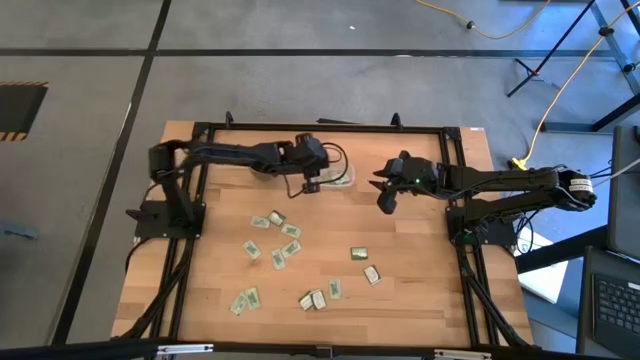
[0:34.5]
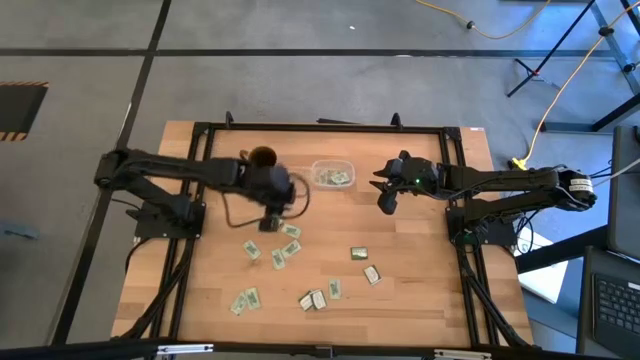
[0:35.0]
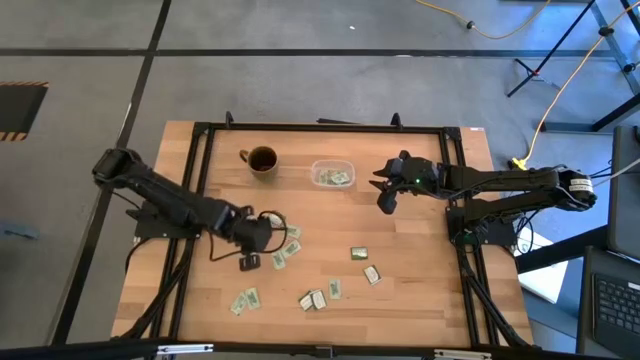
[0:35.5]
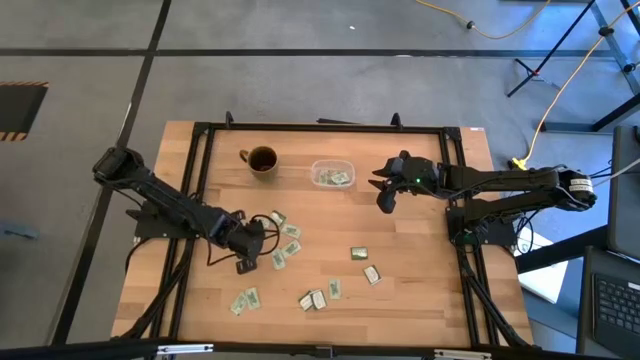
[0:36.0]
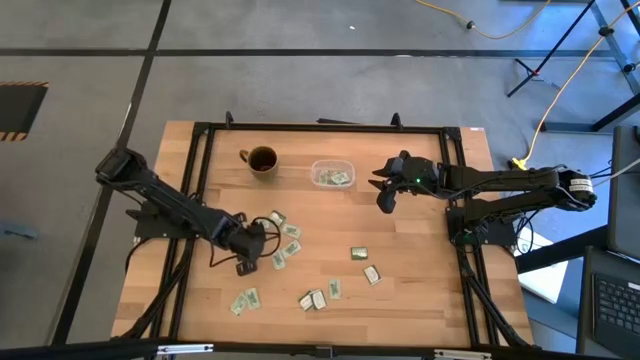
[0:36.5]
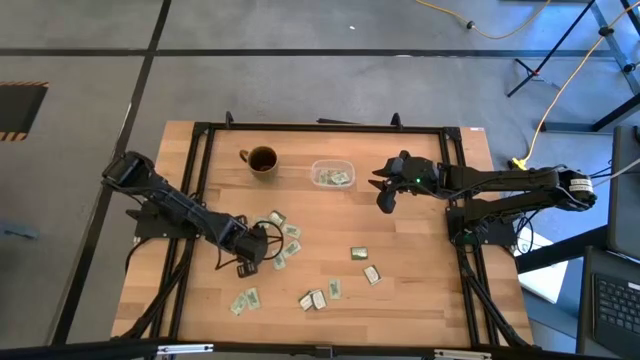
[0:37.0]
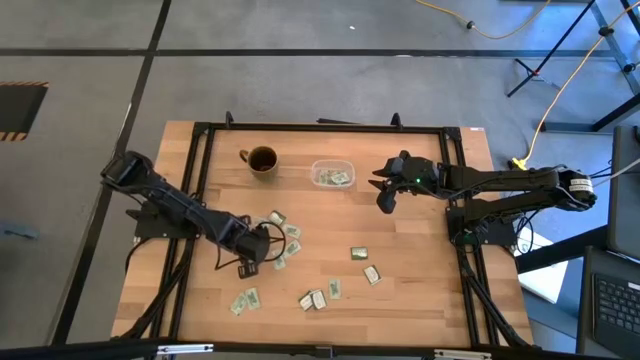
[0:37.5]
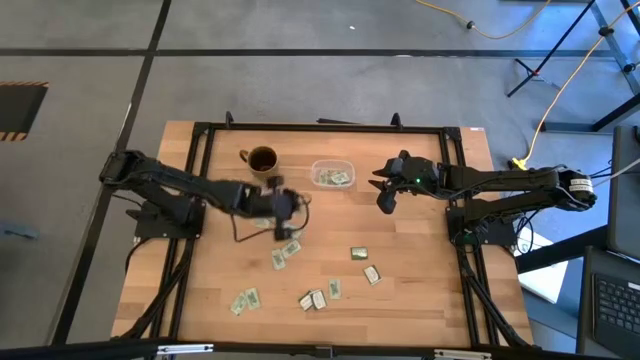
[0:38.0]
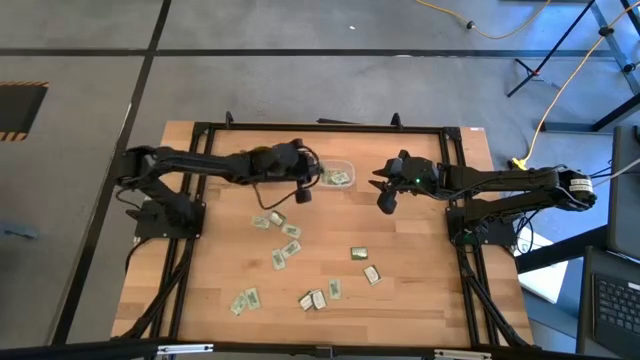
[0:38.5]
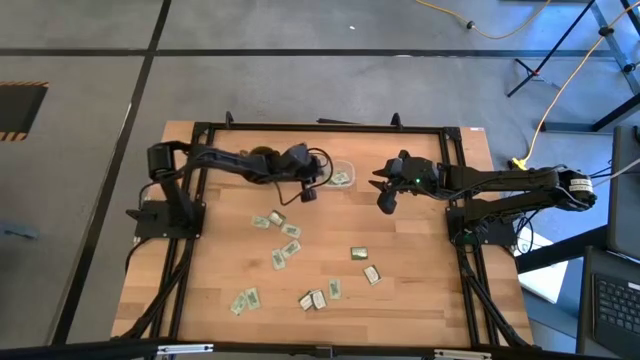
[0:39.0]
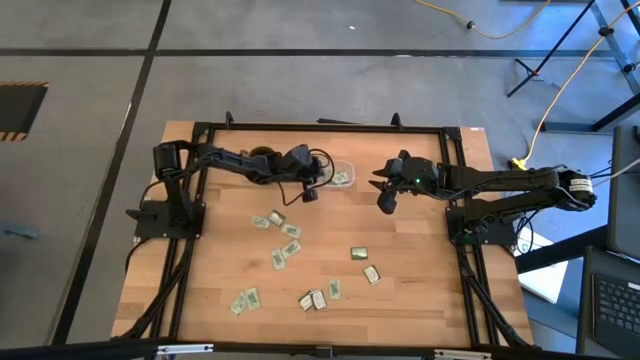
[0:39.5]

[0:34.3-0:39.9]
Task: Pick and place Stevia / Truvia into bins
Put the stevia packet into the transparent container

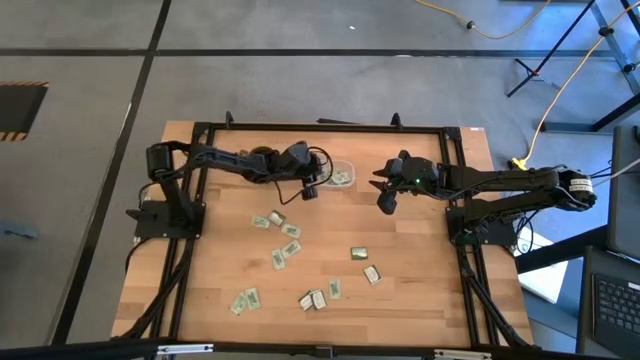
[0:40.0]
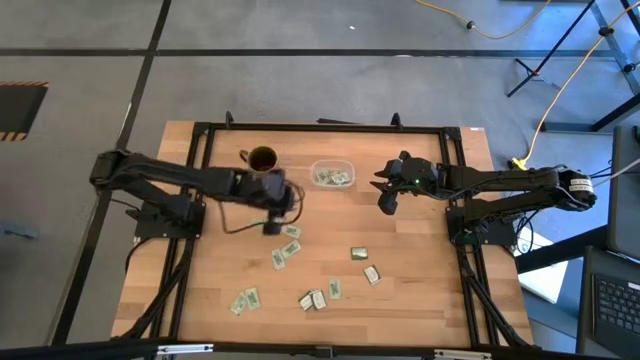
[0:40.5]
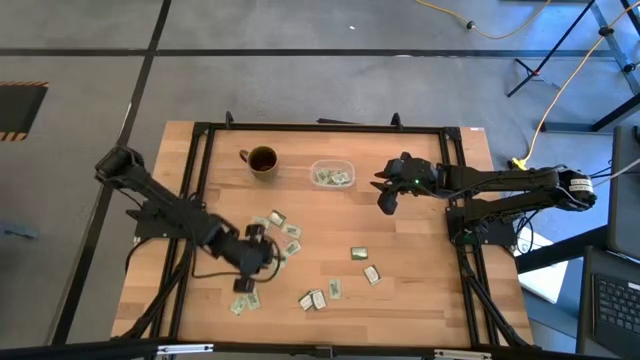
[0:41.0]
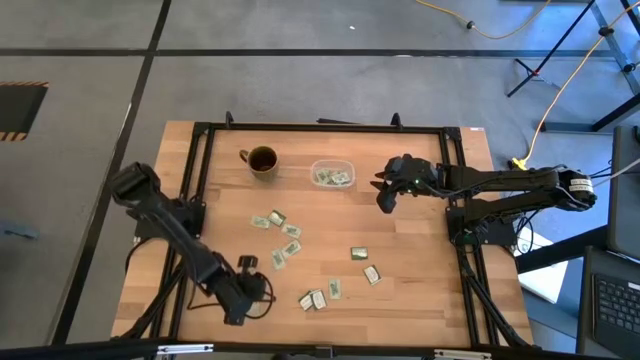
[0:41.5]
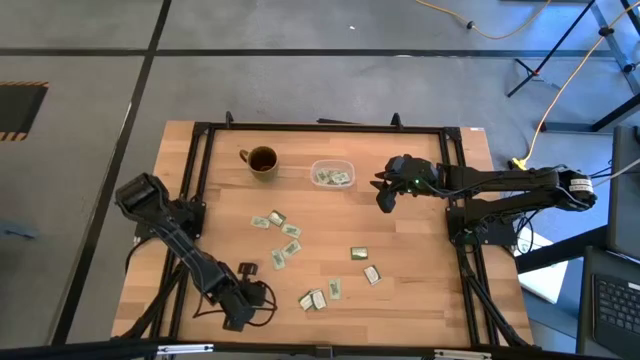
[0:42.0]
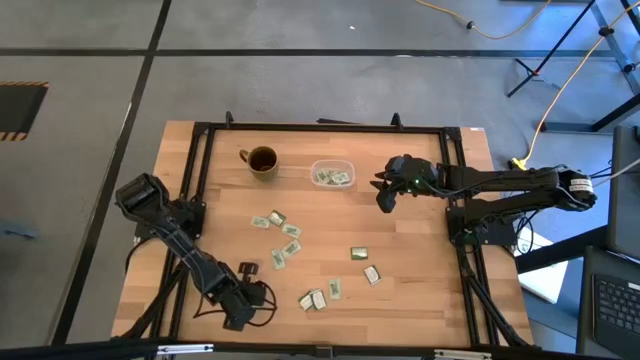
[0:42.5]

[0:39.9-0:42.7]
Put the stevia packet into the transparent container

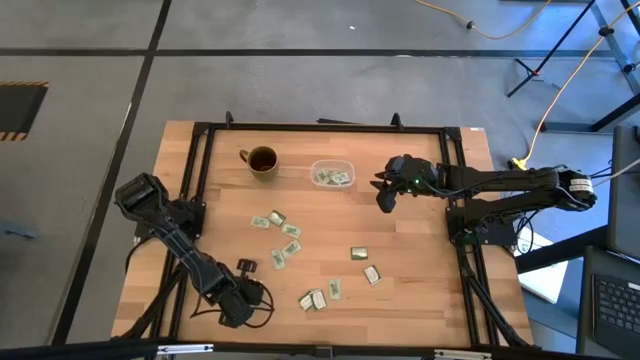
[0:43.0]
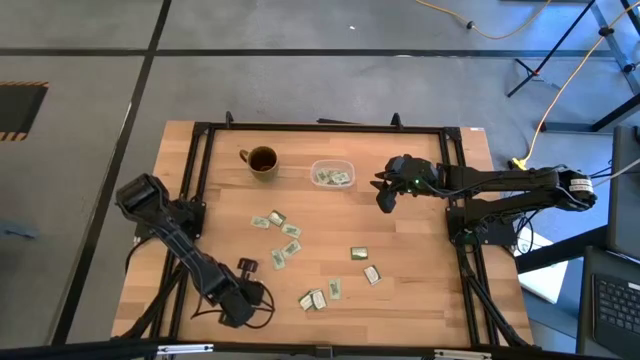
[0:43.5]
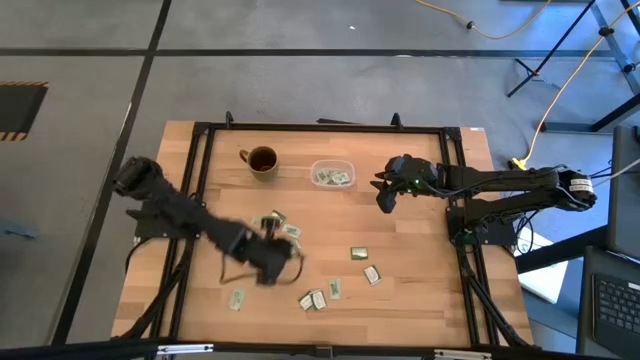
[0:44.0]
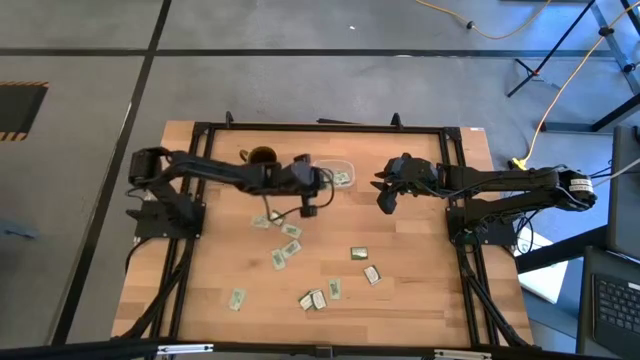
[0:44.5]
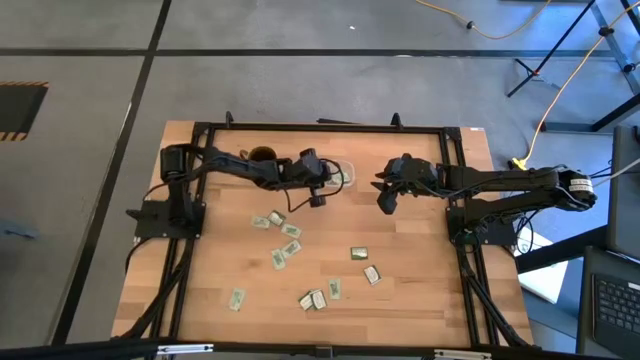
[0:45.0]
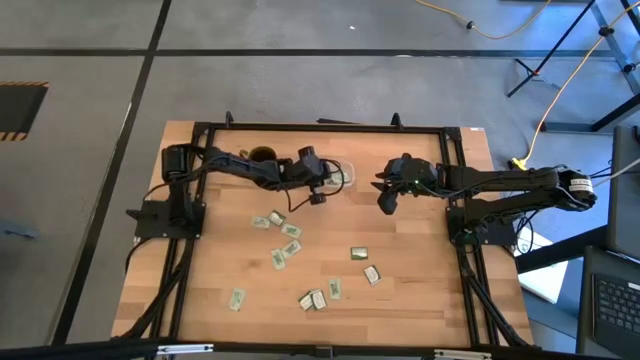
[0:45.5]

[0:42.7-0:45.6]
Put the stevia packet into the transparent container

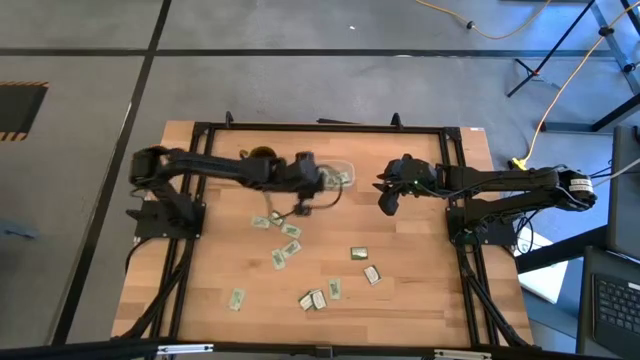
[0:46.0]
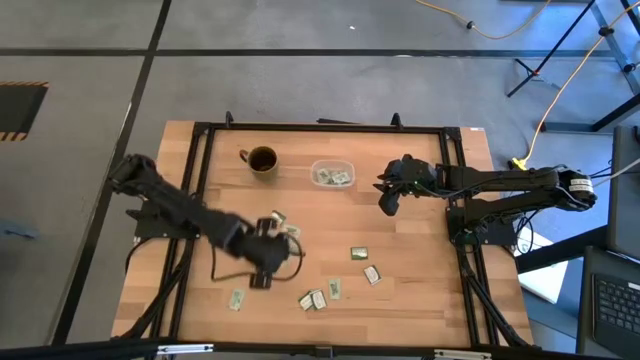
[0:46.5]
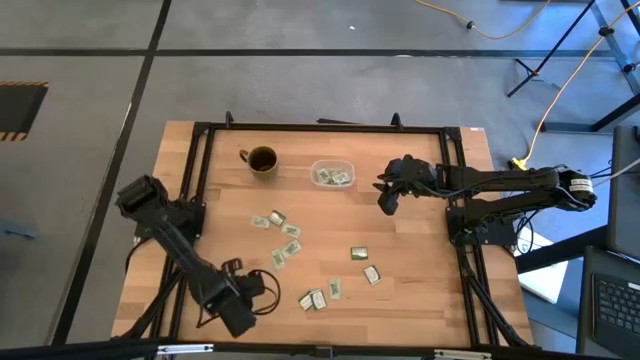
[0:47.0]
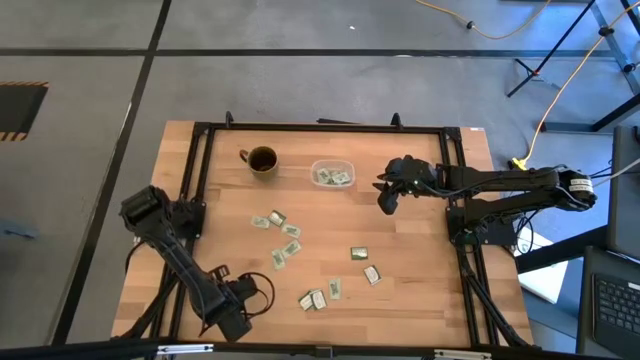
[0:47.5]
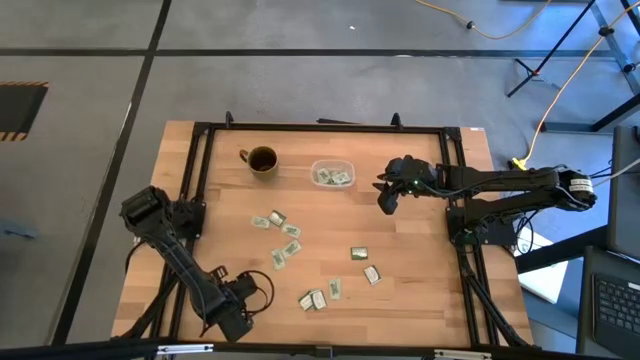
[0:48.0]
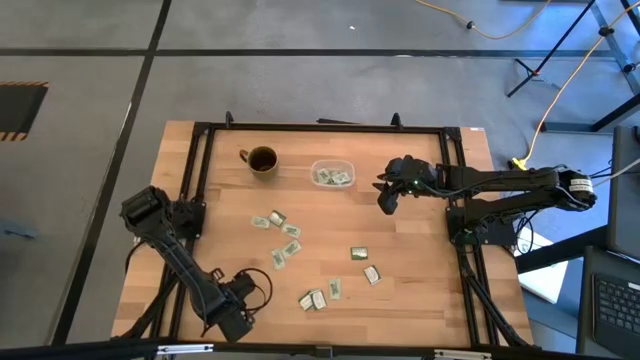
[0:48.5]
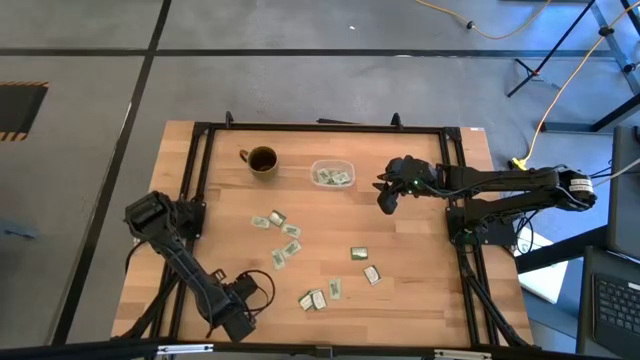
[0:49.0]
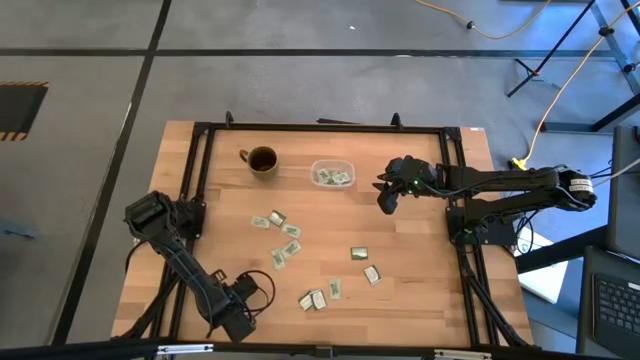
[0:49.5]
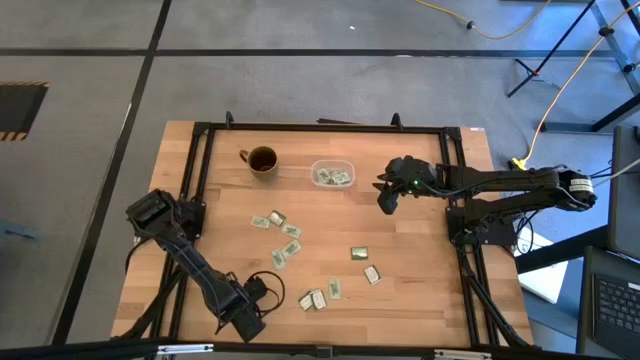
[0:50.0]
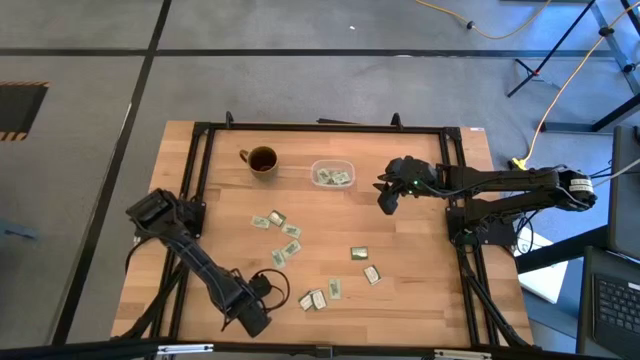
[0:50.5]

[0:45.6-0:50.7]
Put the stevia packet into the transparent container

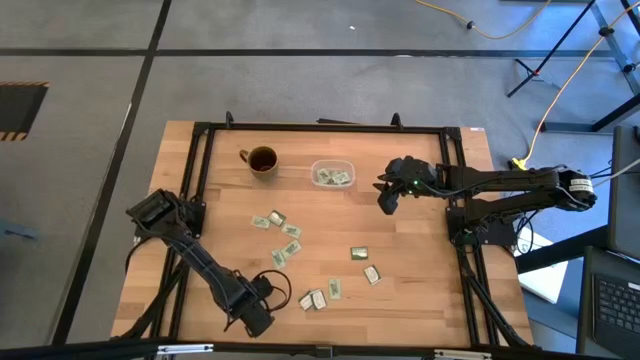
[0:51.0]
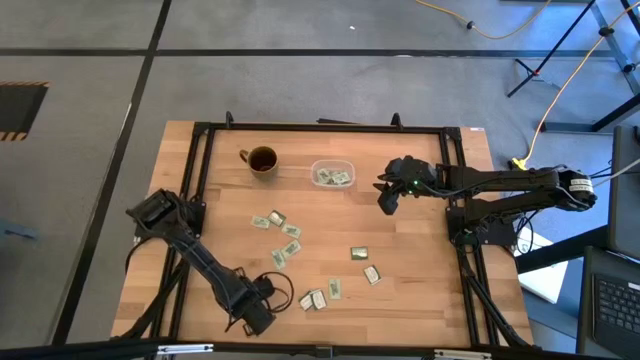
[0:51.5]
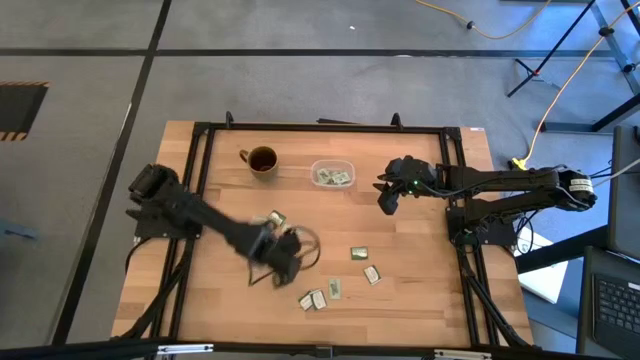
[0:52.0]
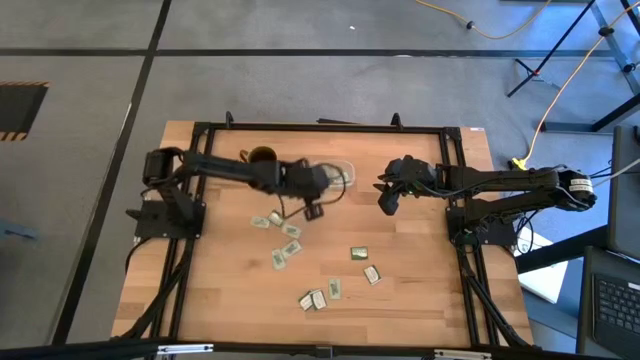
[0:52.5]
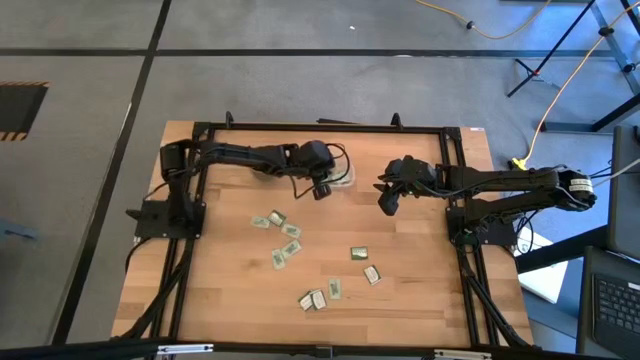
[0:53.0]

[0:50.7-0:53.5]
Put the stevia packet into the transparent container

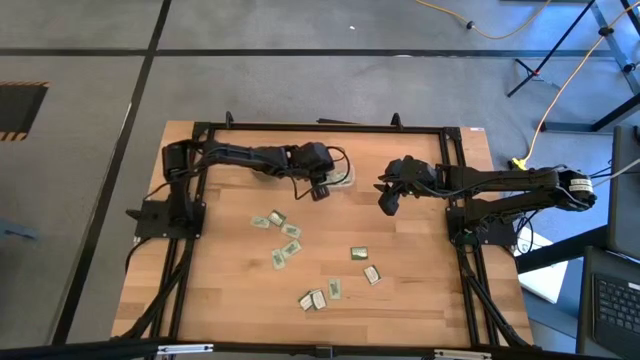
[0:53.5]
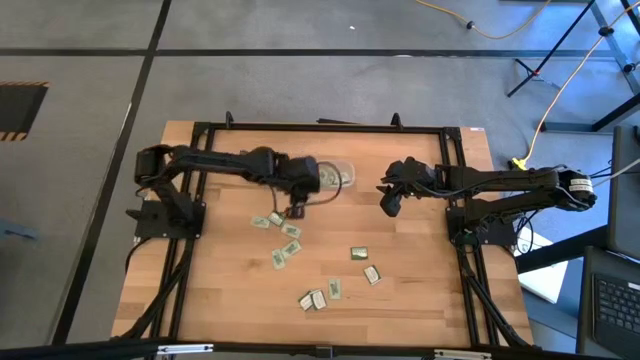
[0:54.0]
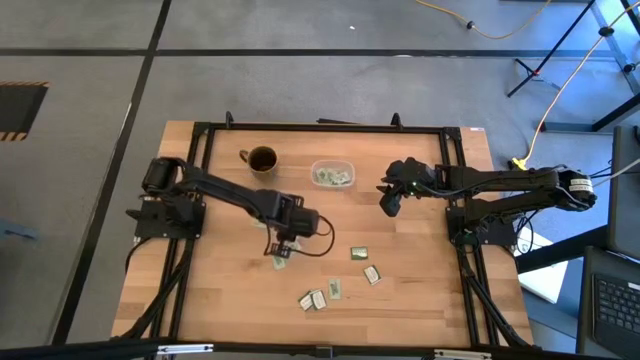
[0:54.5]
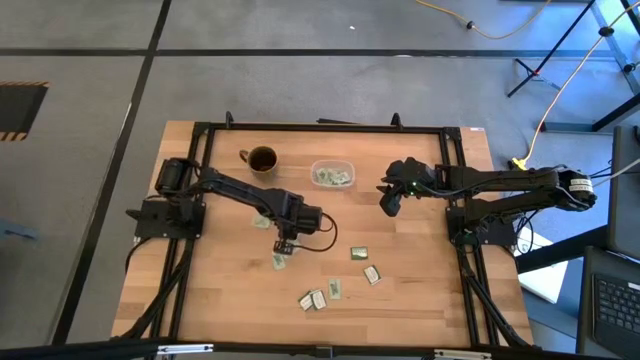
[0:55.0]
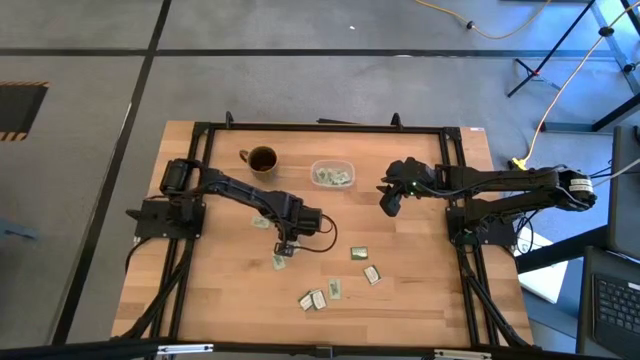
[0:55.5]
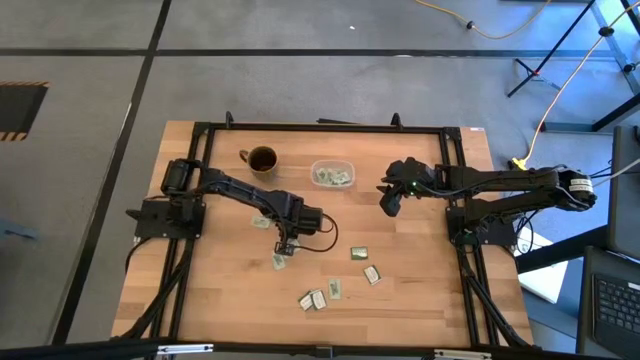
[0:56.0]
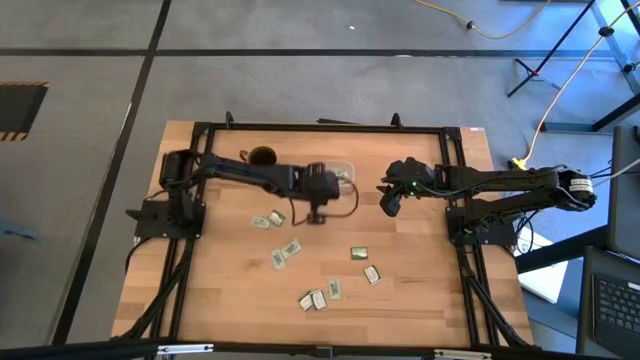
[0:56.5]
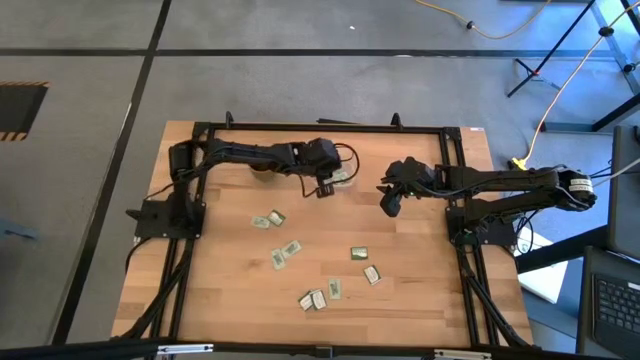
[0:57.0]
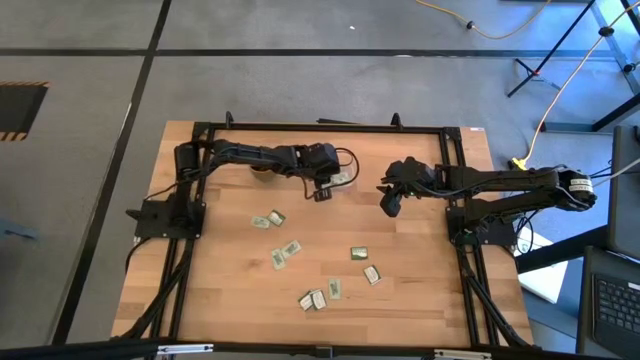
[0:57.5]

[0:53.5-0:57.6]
Put the stevia packet into the transparent container
